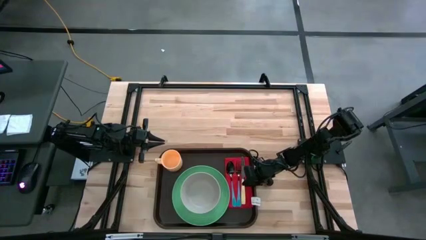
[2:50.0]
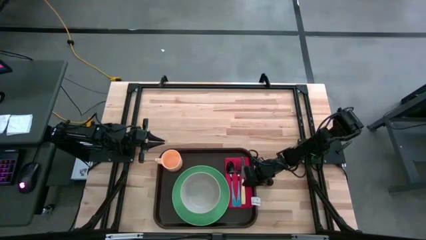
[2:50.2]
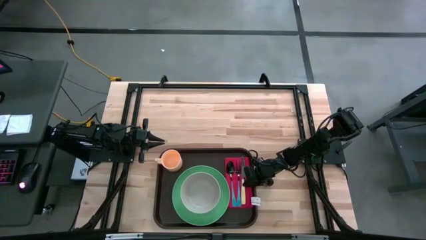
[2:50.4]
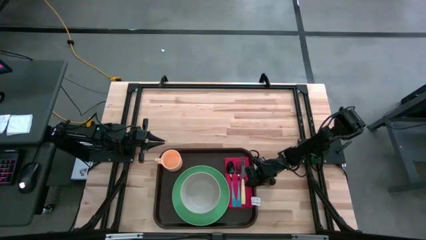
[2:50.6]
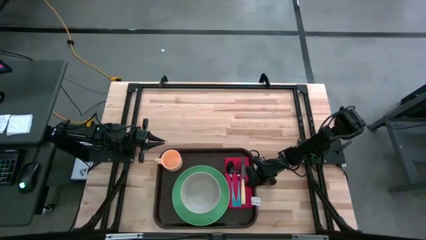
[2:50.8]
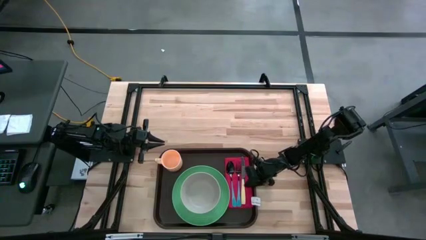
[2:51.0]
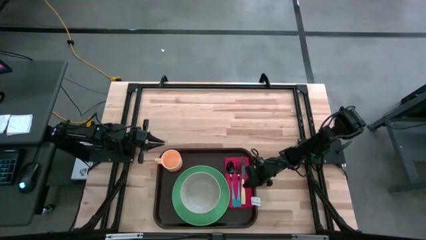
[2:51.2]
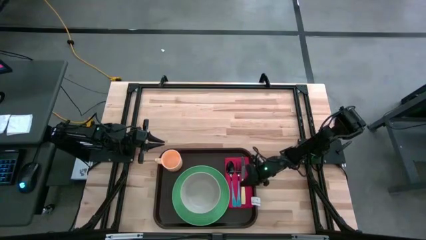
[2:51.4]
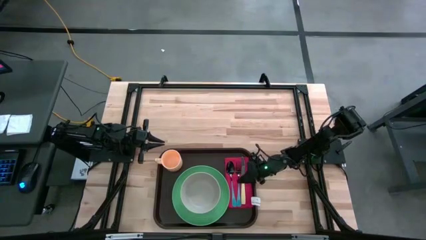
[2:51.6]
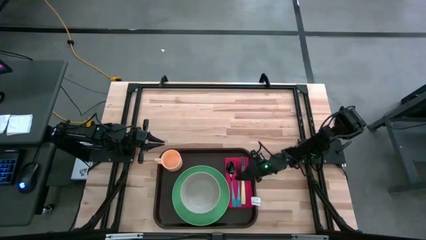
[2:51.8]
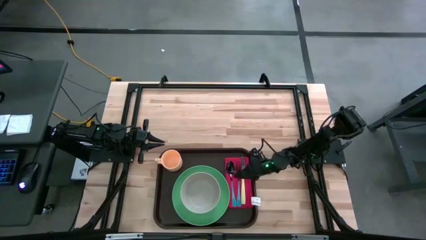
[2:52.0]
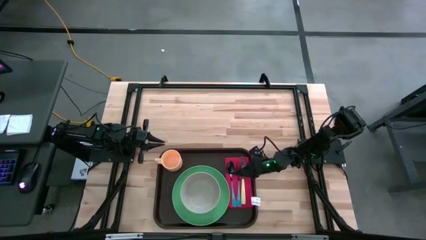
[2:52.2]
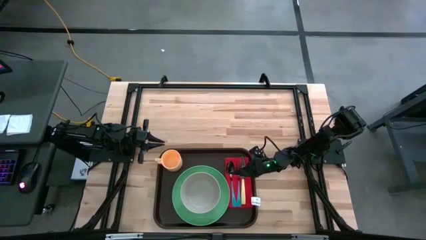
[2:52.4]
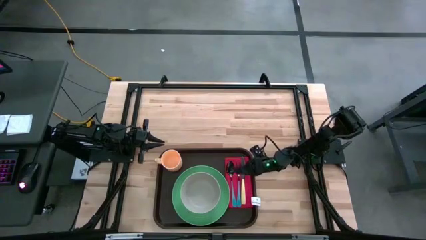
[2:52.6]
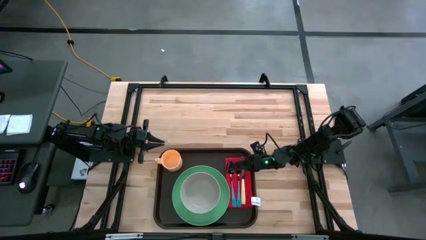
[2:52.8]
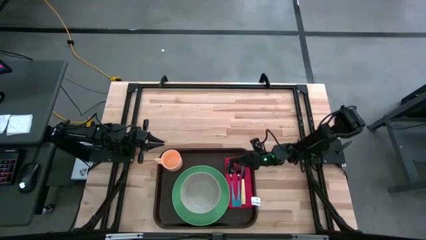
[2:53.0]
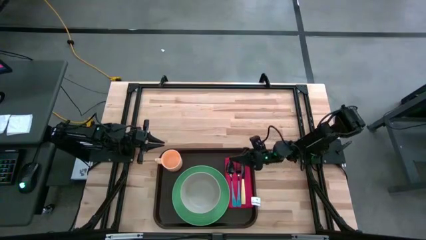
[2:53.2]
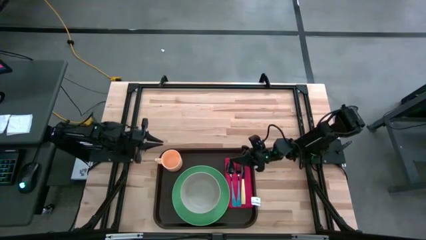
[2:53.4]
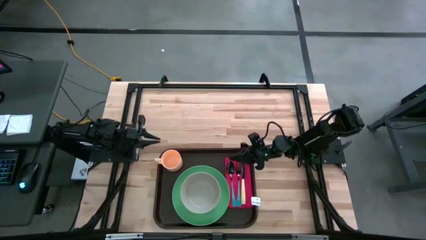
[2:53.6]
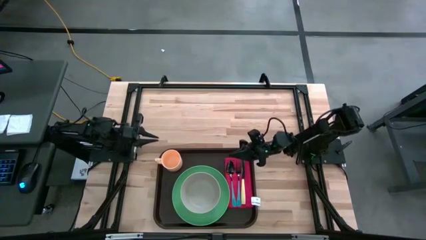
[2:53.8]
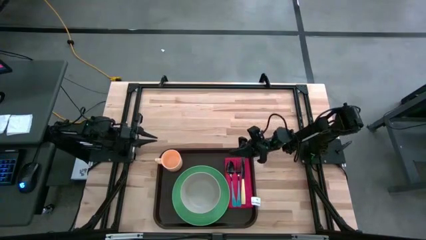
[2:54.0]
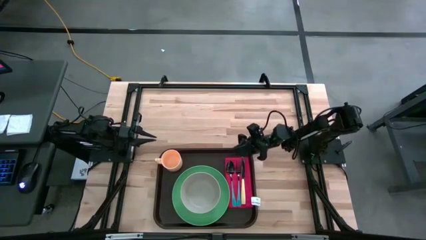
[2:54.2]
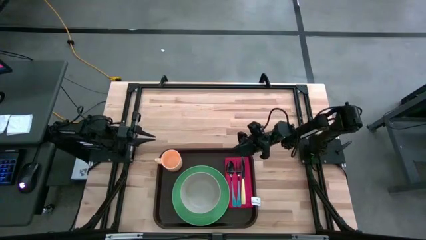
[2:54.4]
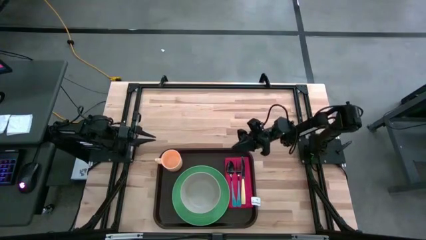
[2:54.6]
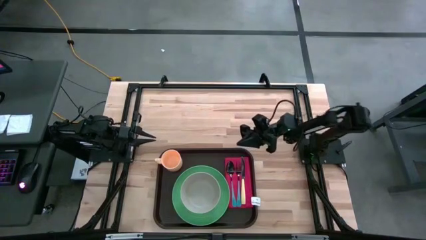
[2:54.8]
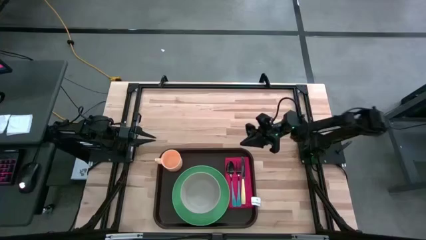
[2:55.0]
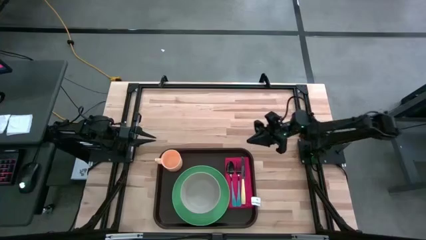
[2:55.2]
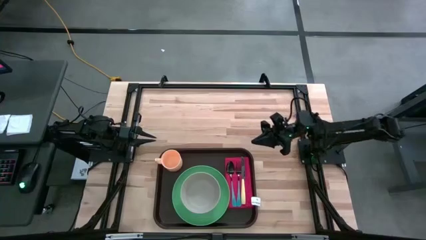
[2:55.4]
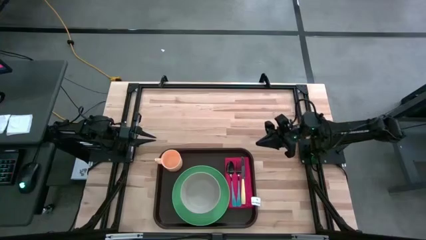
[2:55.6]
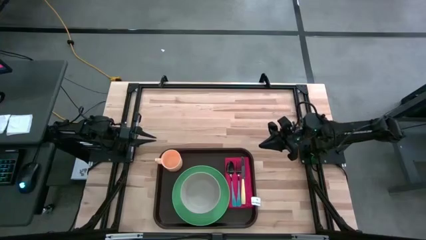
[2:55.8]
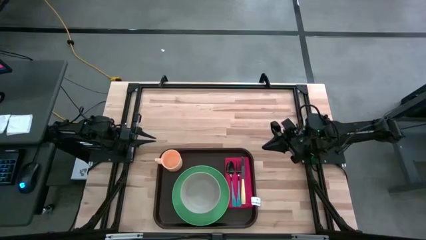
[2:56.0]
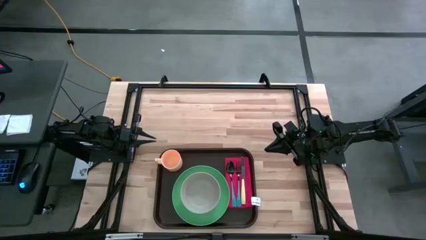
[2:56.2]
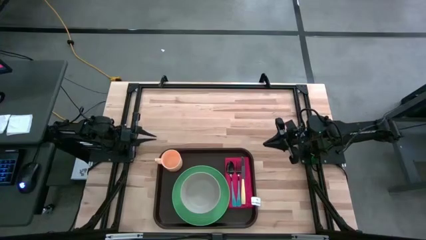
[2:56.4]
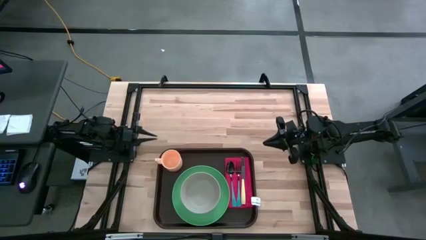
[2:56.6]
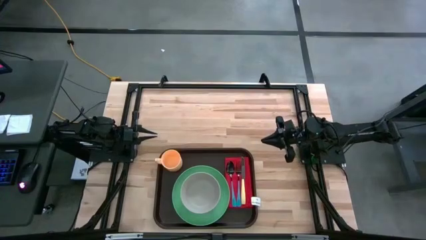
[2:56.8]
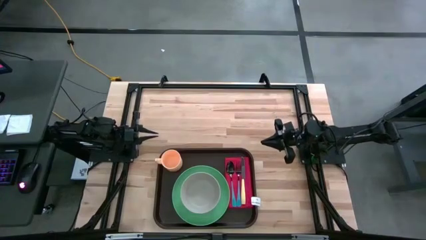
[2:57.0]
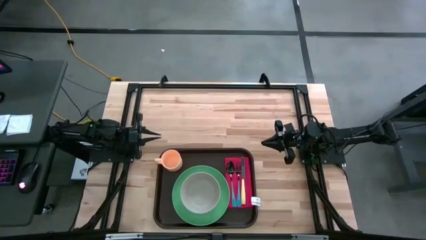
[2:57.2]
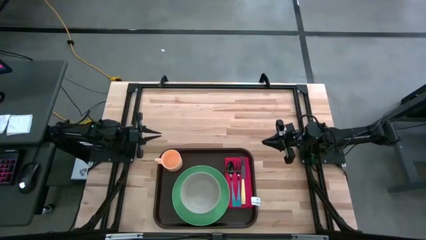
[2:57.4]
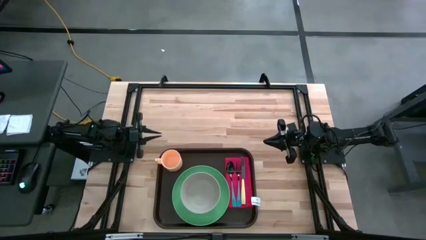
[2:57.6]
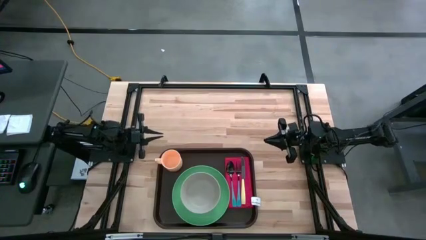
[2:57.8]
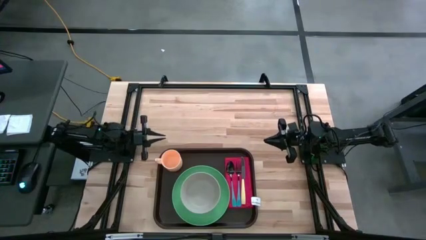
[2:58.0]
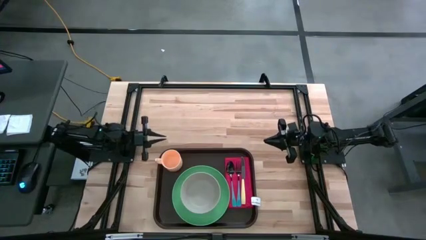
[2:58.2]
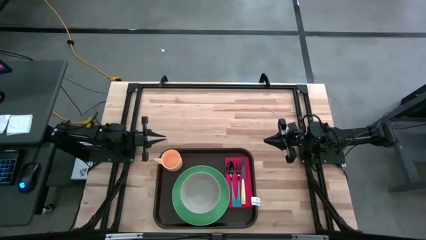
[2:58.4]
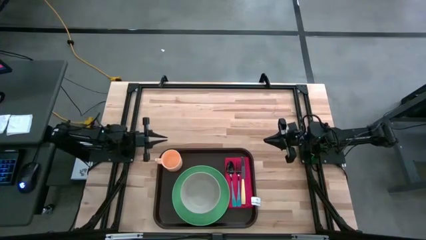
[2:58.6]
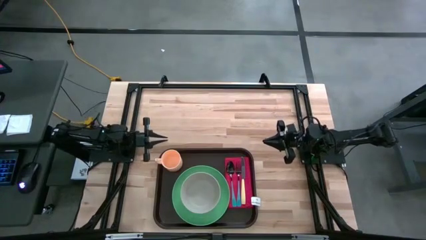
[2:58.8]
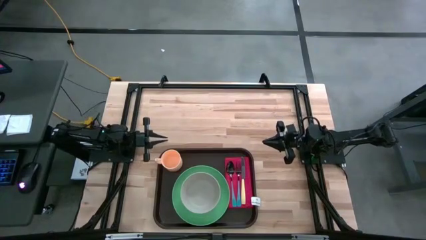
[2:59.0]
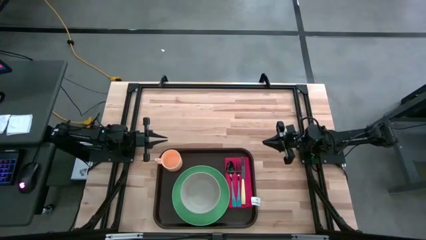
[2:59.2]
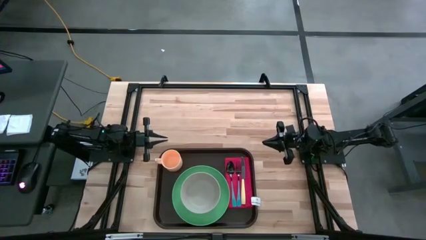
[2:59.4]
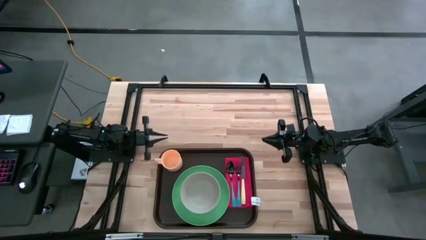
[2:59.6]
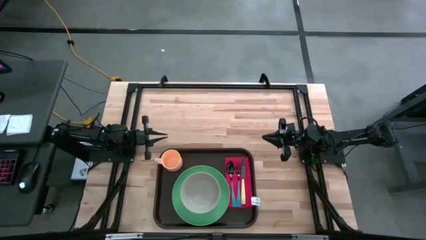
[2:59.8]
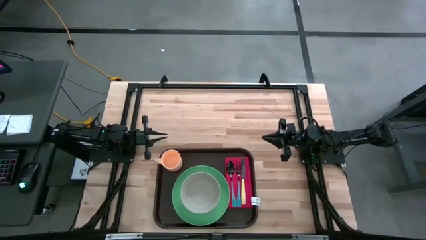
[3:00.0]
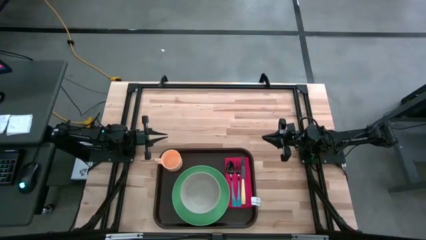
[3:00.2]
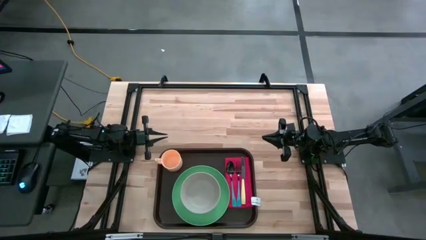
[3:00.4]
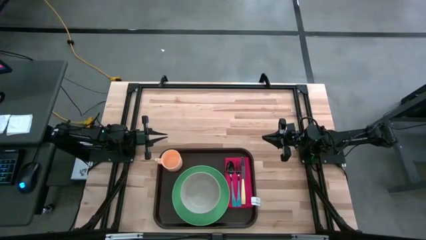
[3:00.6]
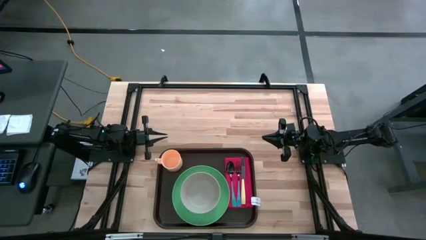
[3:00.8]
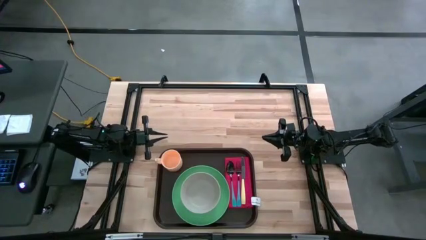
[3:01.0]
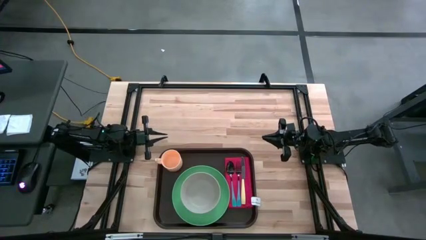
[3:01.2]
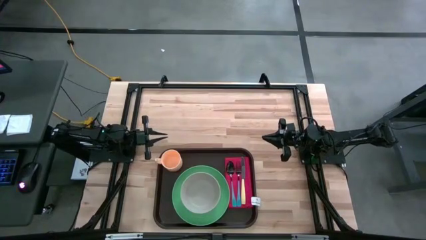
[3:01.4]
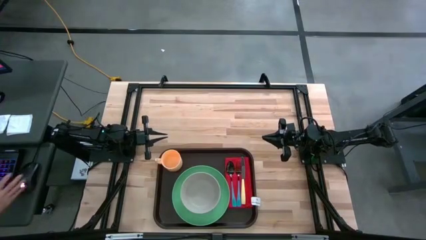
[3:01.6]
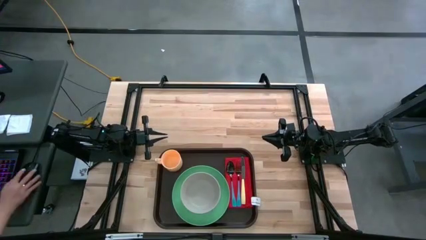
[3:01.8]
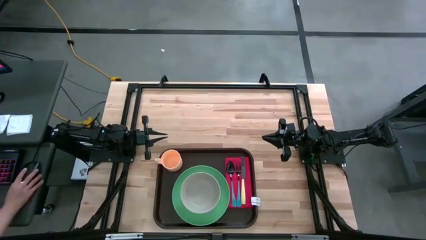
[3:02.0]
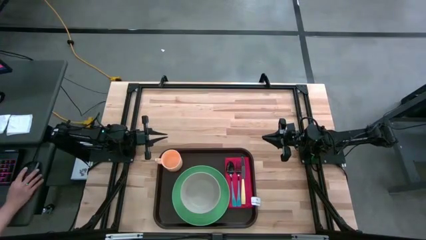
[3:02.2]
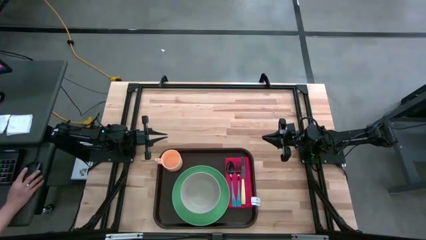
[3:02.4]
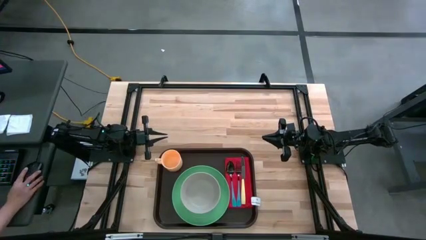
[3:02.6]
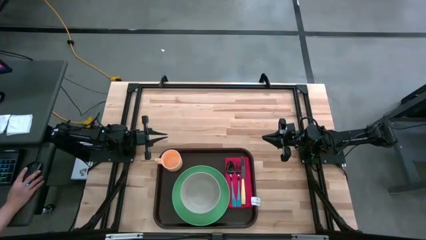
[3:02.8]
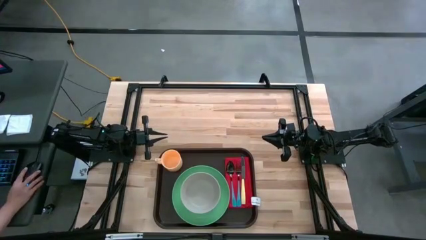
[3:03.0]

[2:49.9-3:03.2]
Task: Set up tray
Return to Home Position

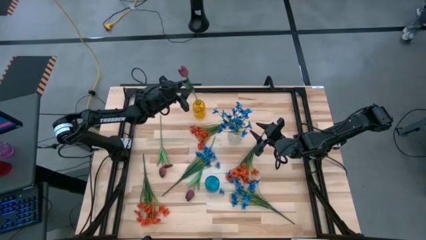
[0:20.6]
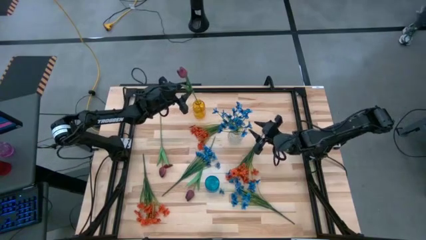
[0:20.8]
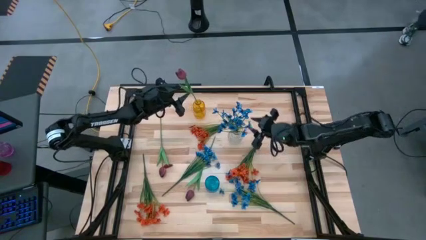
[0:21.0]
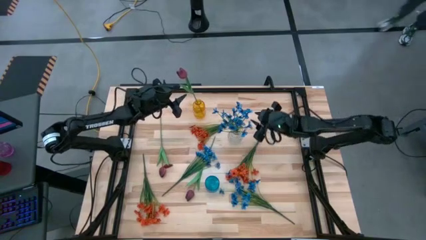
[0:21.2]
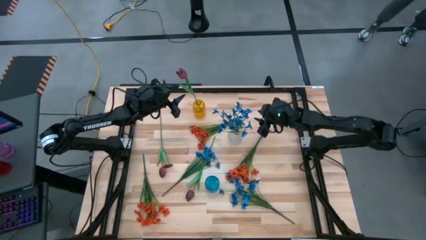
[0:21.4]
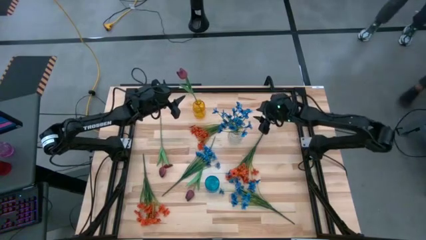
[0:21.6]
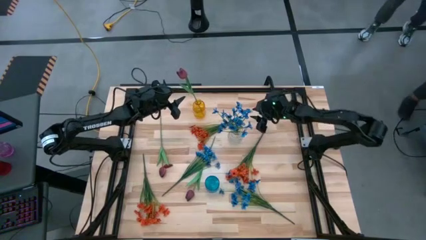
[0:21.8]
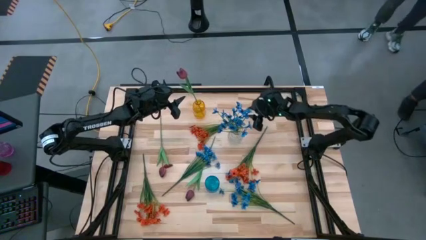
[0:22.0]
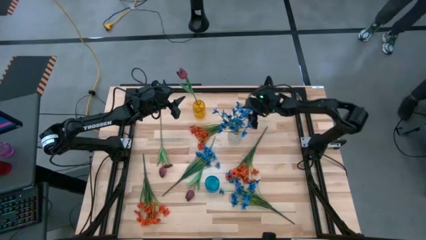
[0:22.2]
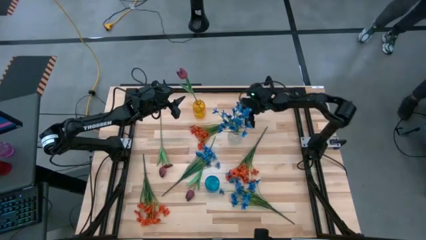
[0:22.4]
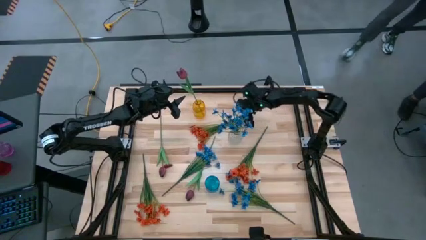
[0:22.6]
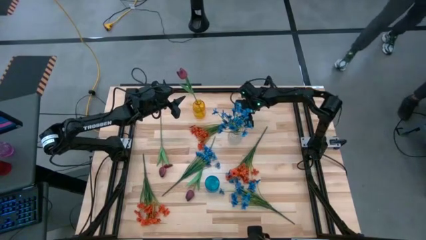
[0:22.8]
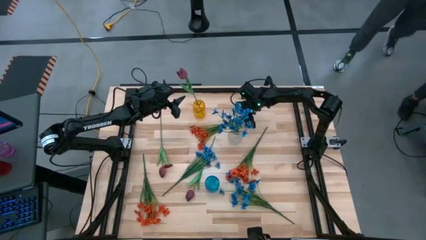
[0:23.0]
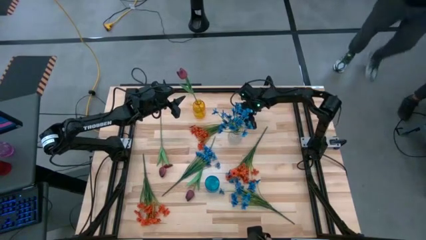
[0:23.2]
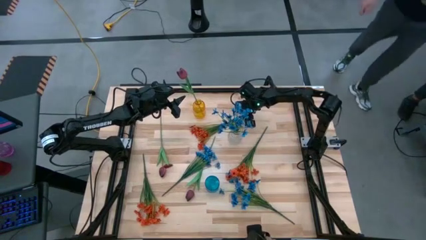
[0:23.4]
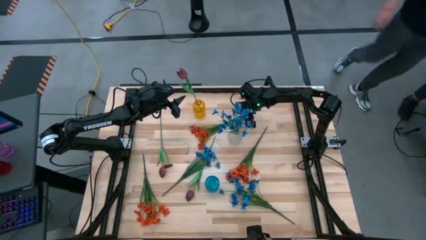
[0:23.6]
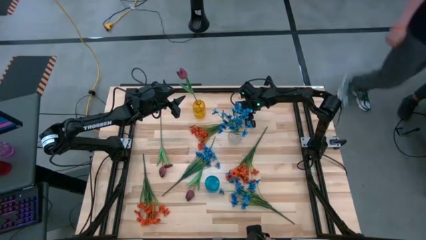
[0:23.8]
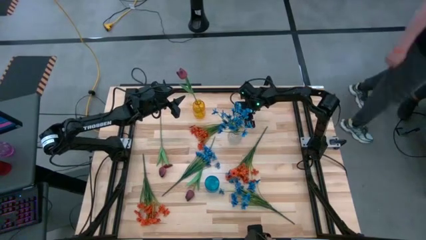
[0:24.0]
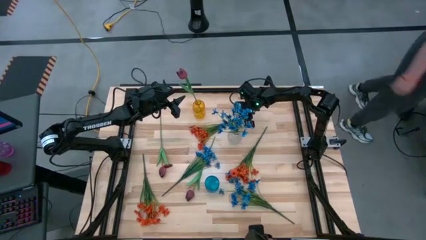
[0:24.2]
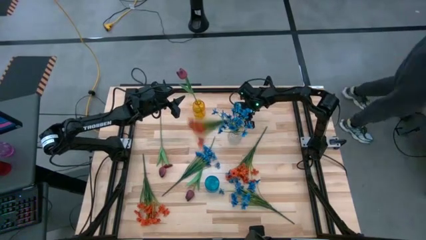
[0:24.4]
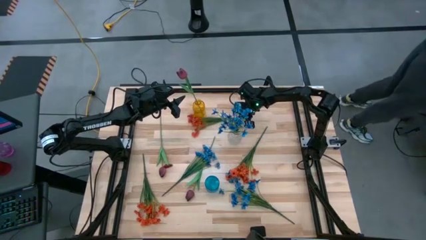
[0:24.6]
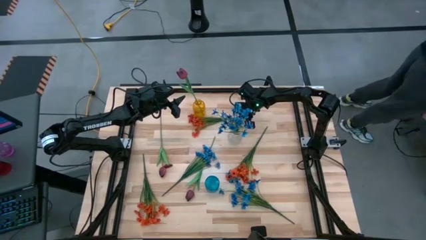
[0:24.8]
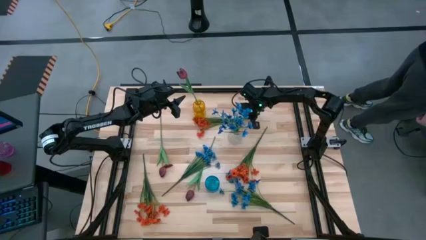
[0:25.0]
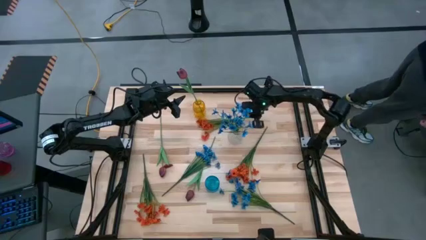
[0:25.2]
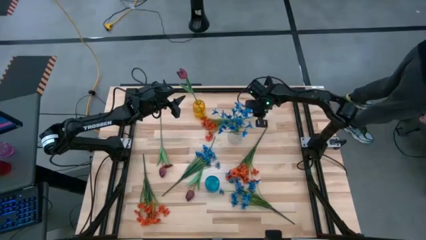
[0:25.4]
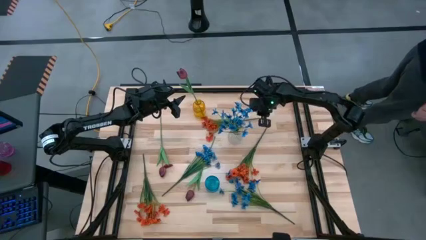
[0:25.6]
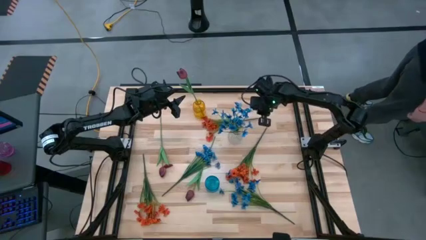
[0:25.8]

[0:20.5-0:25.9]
Task: Sort flowers into vase by color
Put the top orange flowers into the blue vase
